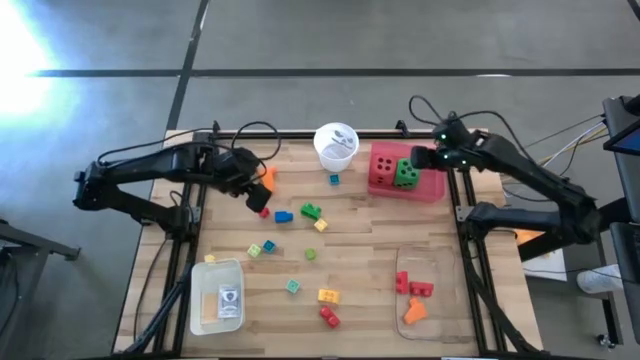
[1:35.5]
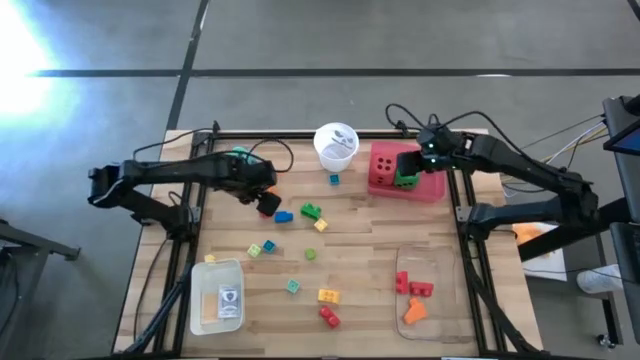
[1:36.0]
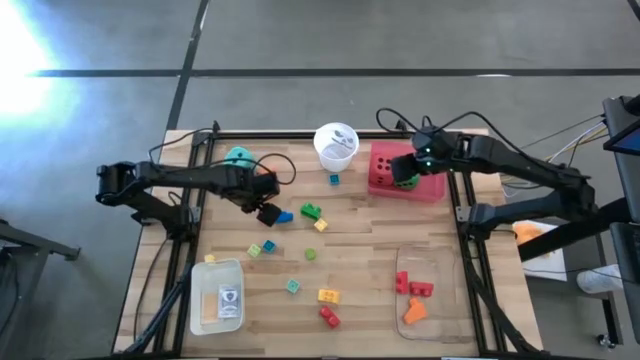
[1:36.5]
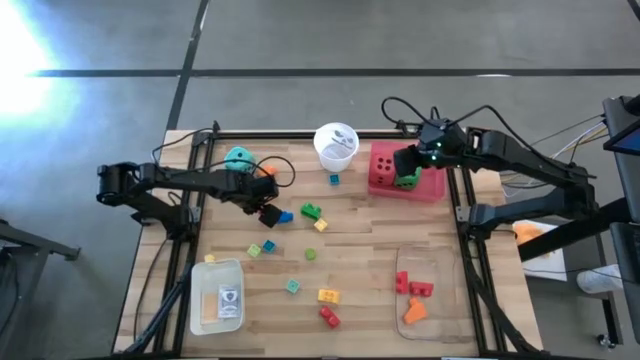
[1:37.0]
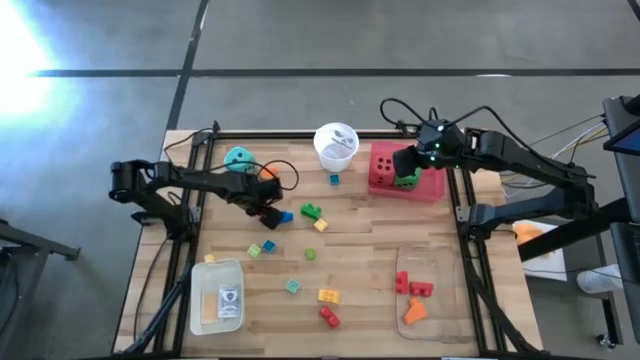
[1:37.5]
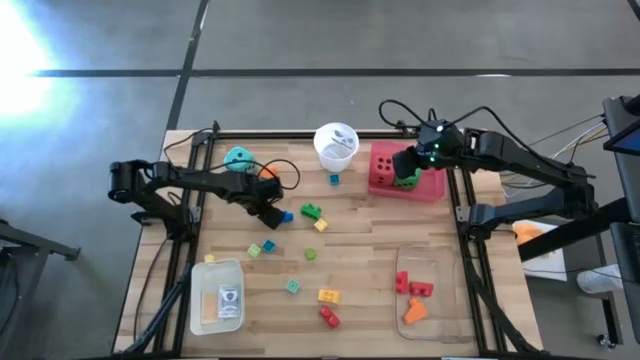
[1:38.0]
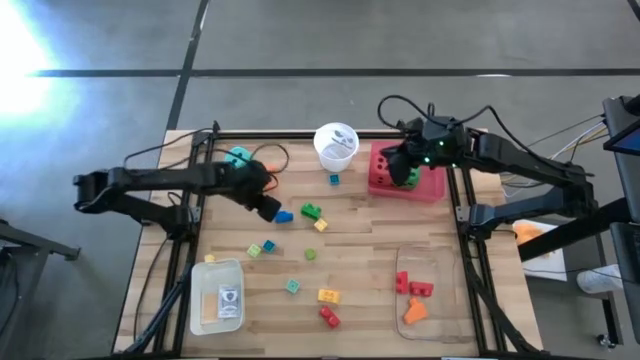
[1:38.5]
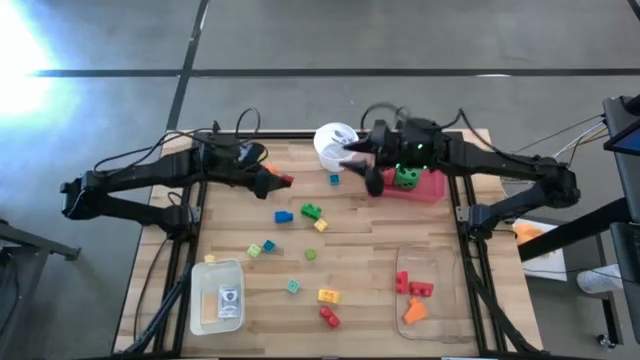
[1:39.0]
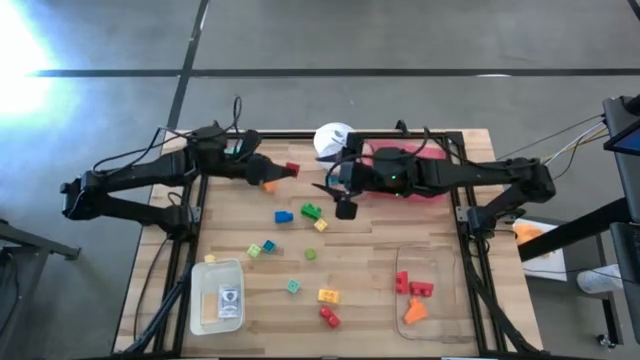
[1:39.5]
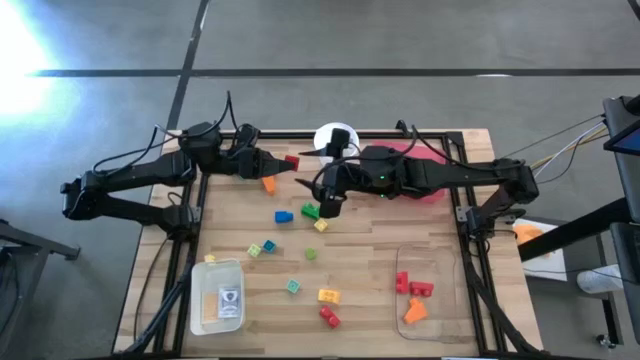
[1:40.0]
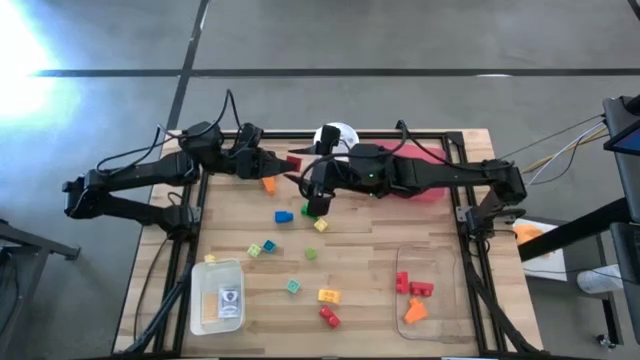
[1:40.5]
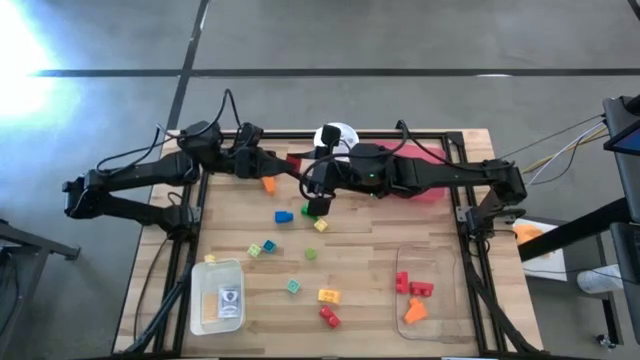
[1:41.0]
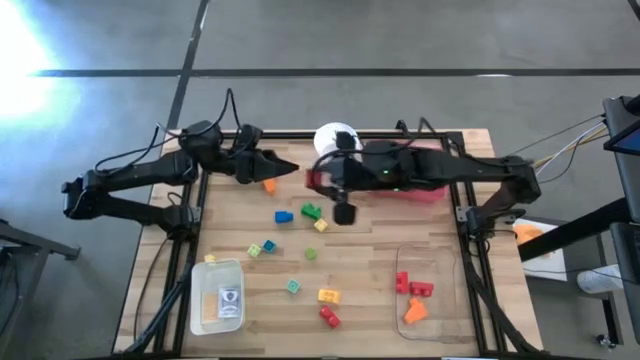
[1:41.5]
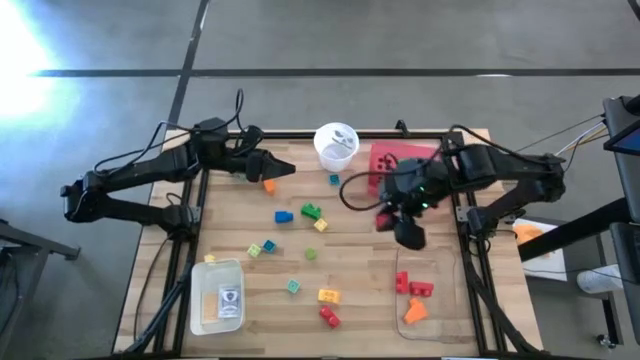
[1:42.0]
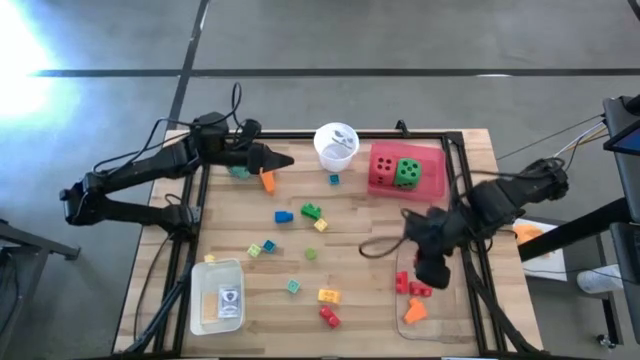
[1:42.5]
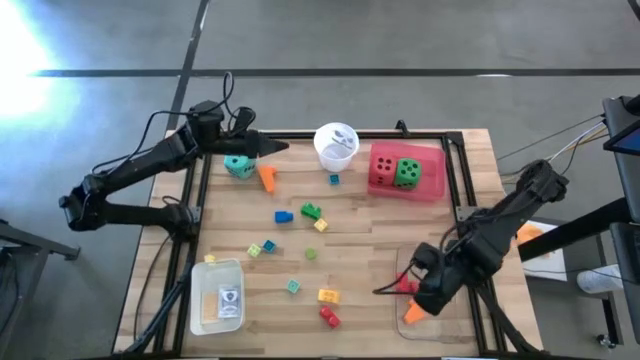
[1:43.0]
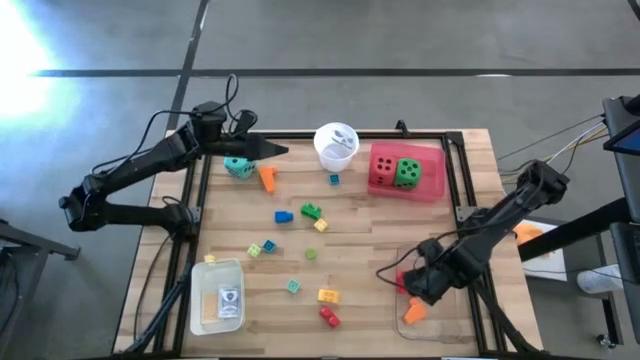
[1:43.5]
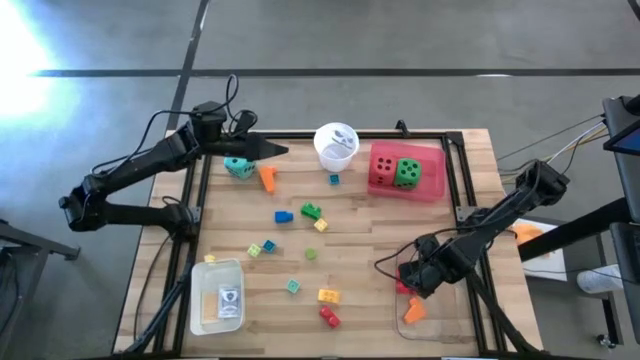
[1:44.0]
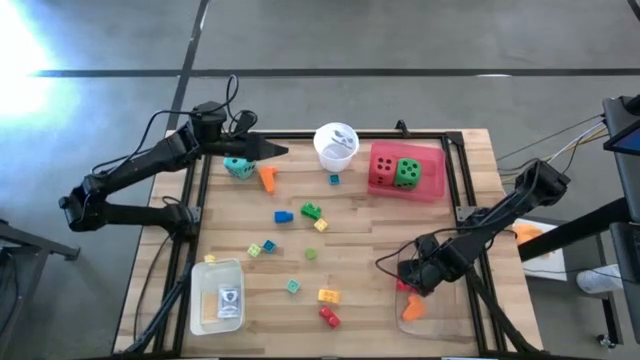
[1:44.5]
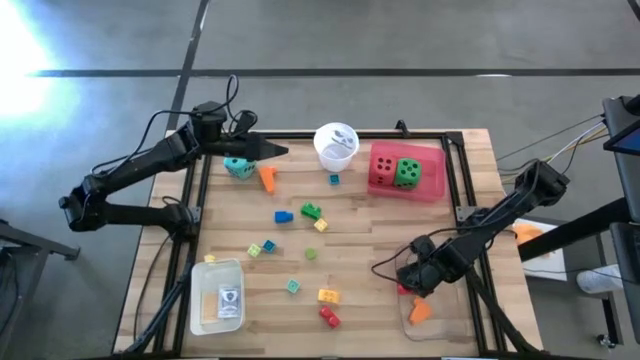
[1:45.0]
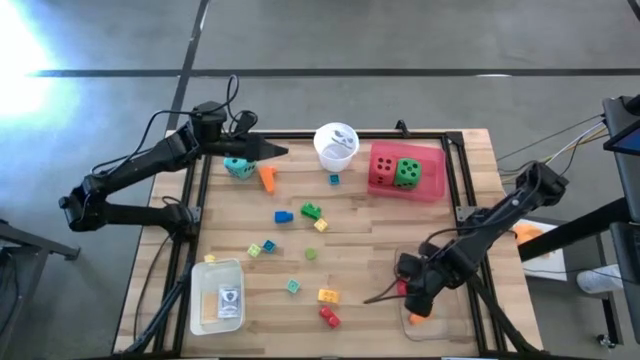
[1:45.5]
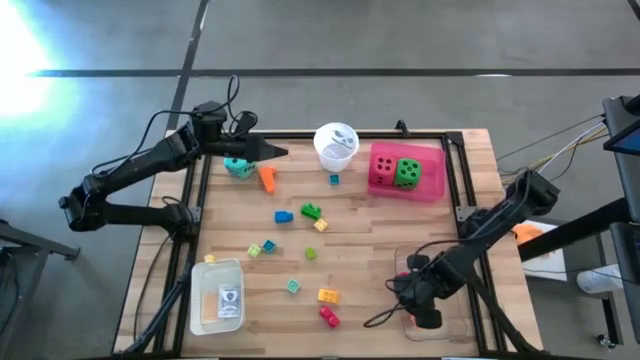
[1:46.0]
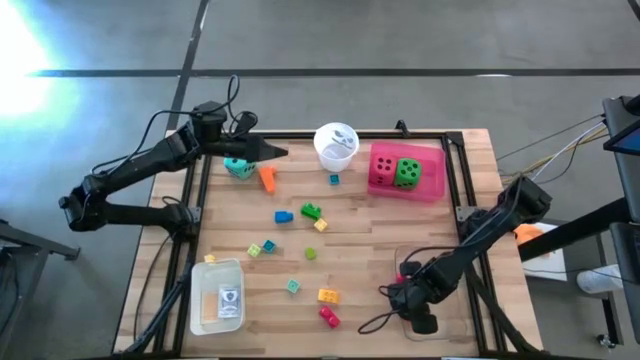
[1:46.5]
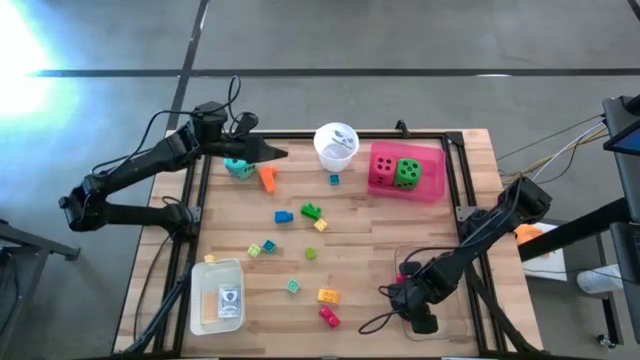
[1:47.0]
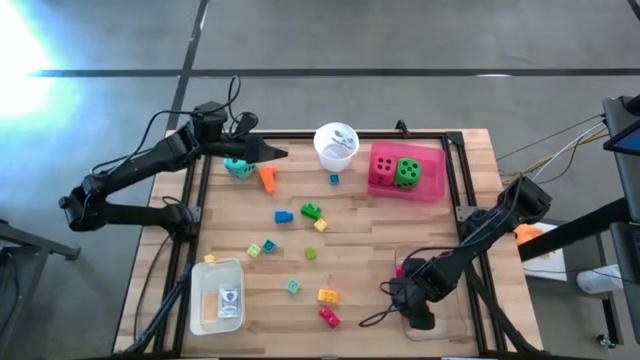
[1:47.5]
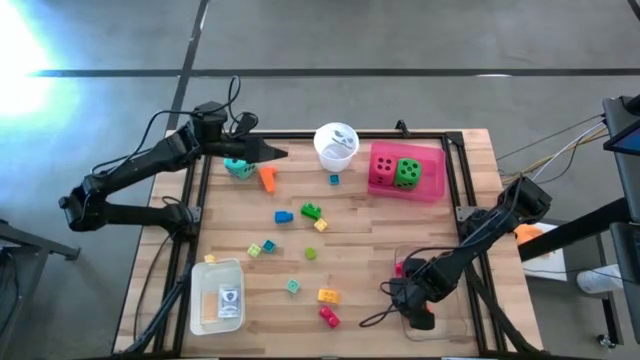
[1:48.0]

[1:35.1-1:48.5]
Task: Pick & Place Toys
Put the red game piece into the transparent bin

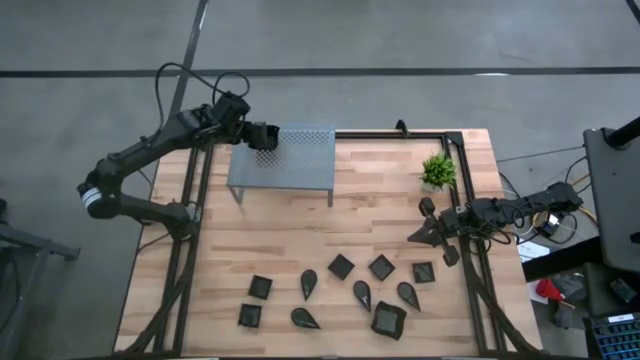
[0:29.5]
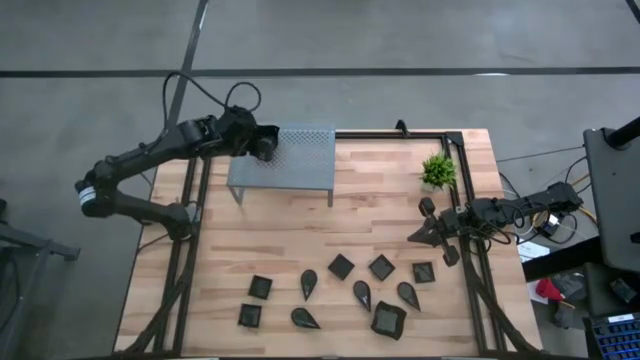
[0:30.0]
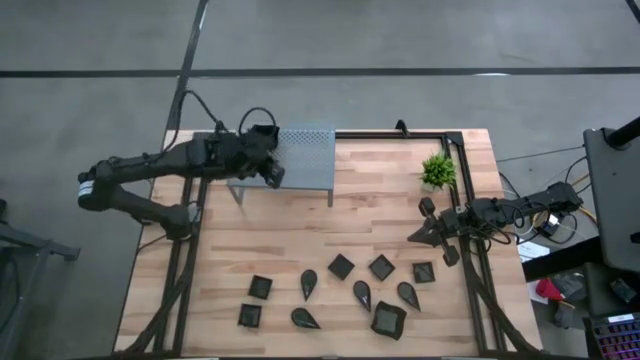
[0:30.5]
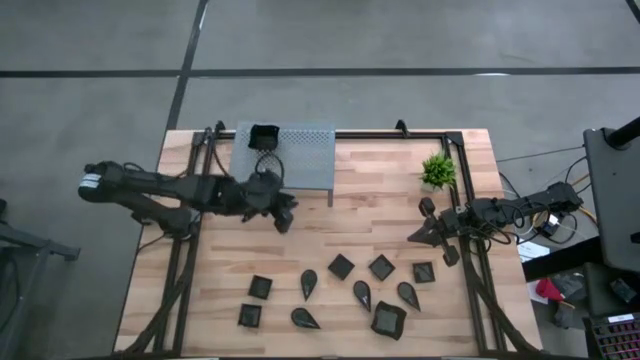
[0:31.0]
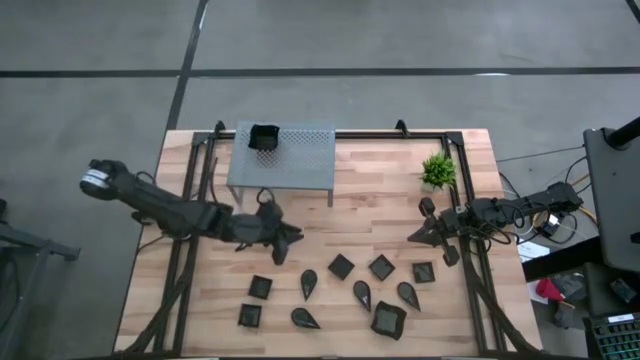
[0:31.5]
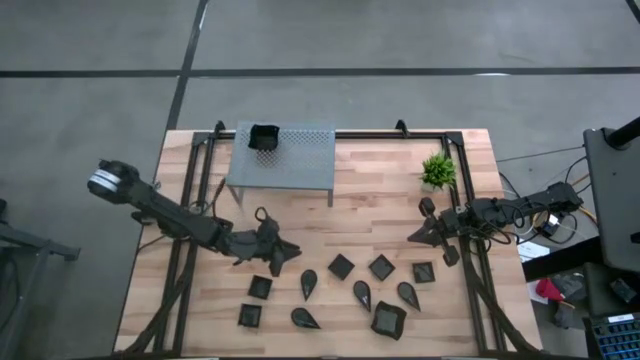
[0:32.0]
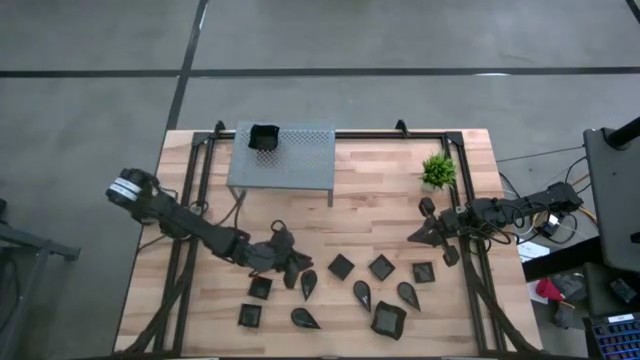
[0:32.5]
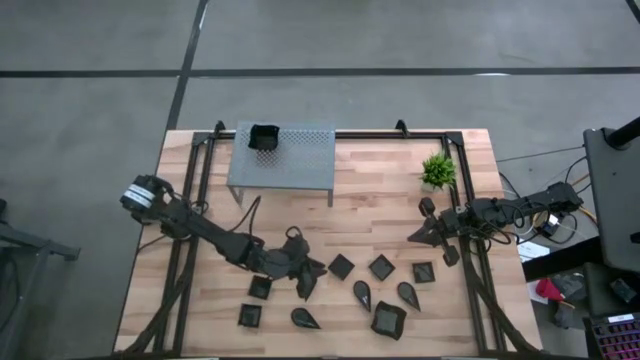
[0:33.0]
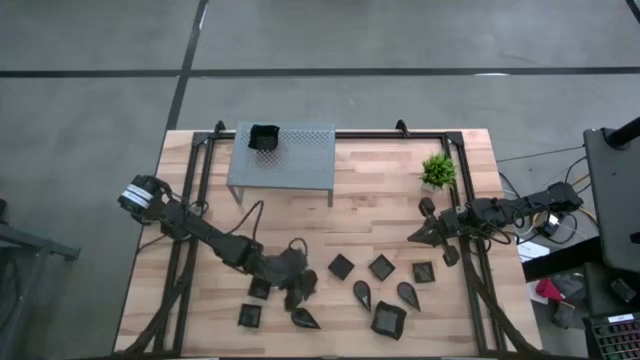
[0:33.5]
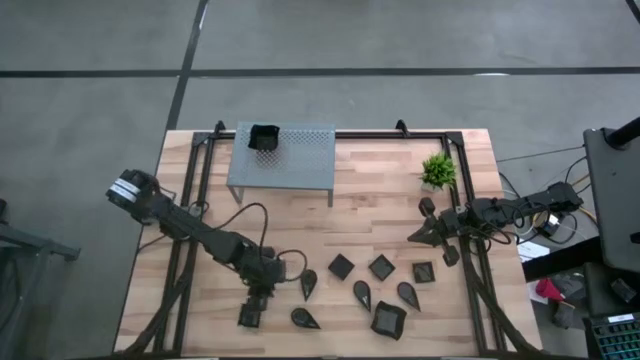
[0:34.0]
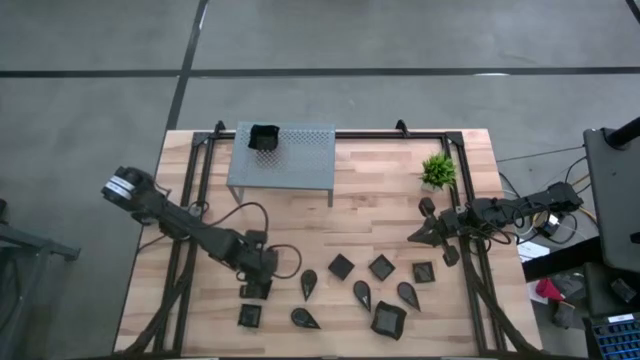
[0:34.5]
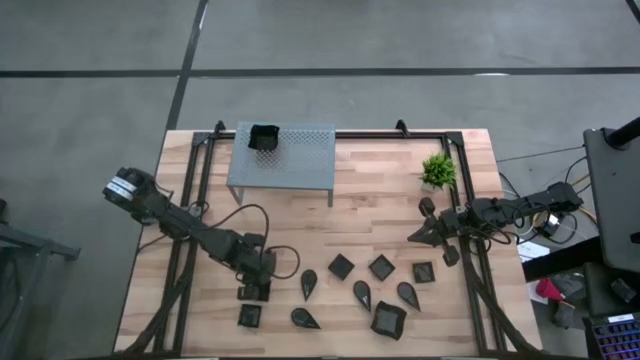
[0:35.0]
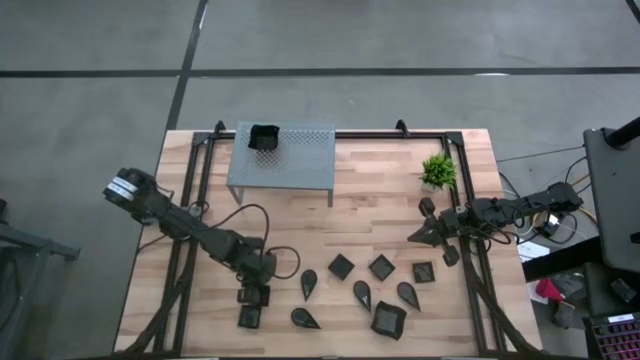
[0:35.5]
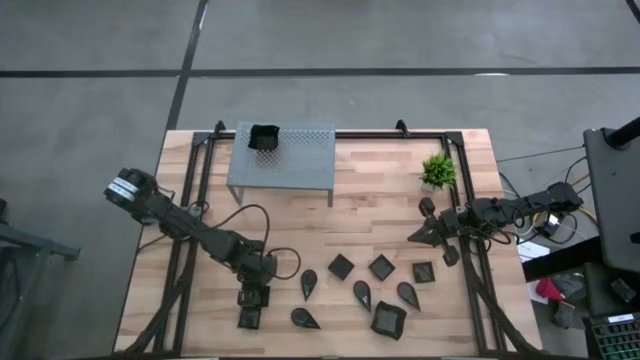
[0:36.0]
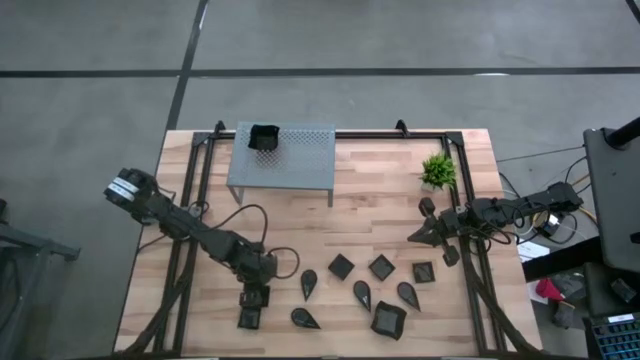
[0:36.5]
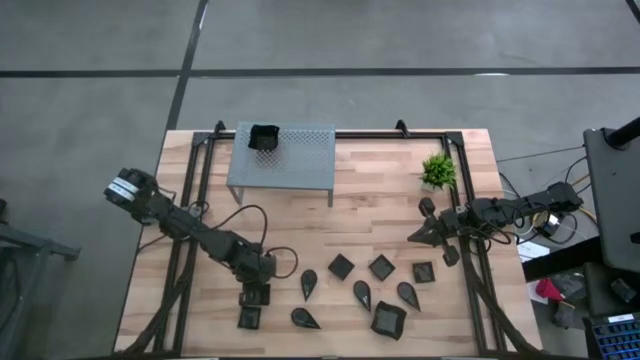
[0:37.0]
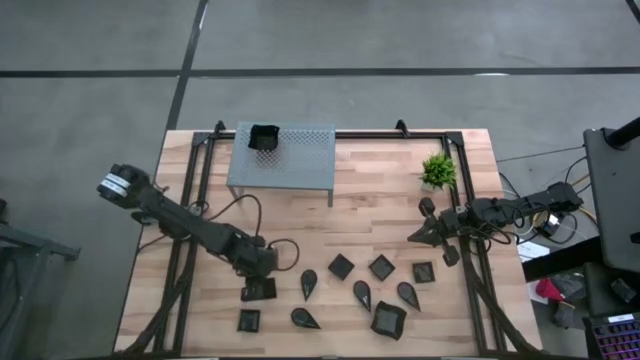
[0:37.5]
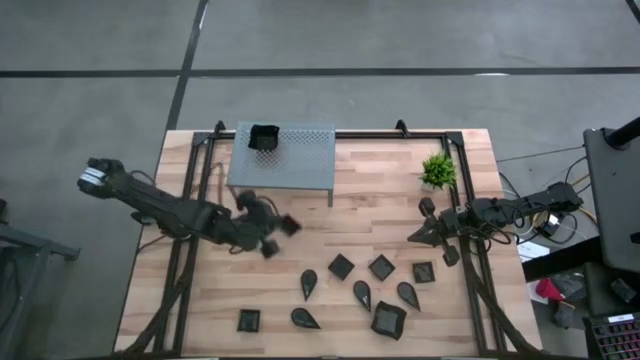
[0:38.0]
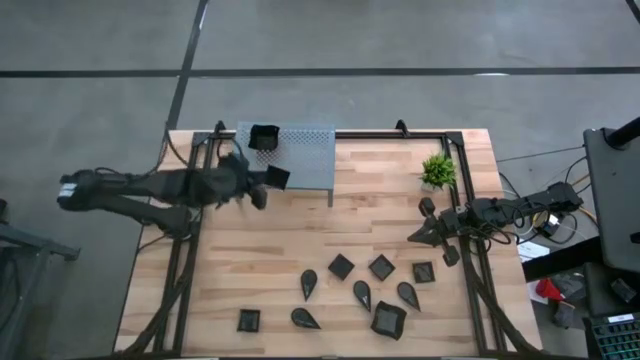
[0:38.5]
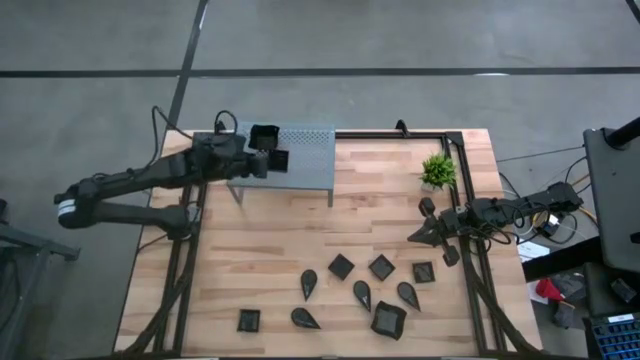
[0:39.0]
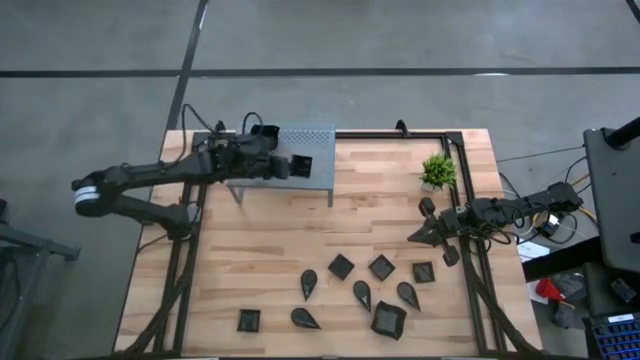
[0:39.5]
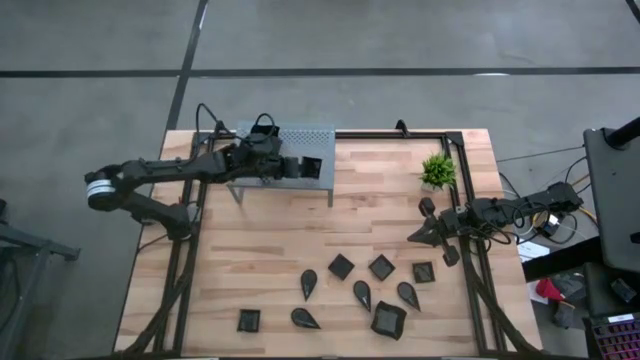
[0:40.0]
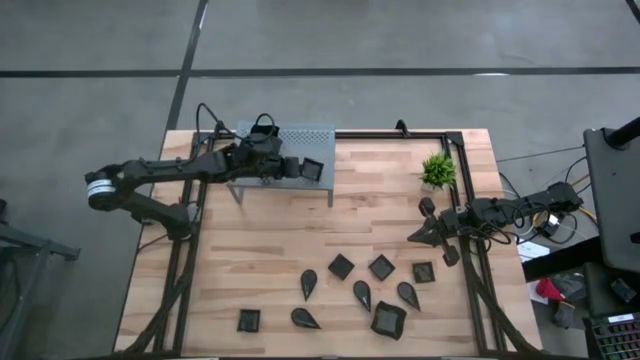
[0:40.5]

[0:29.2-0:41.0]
Task: Pick & Place Mini shaped plates
Put the black square plate on the shelf
